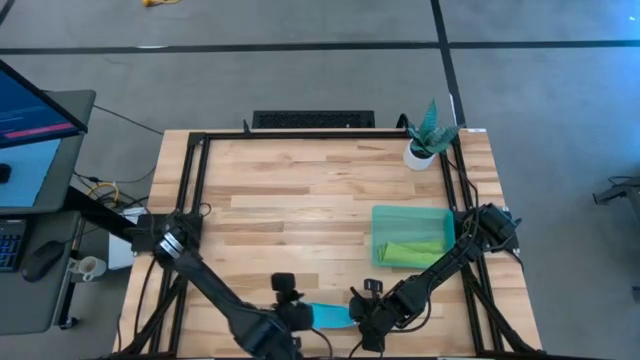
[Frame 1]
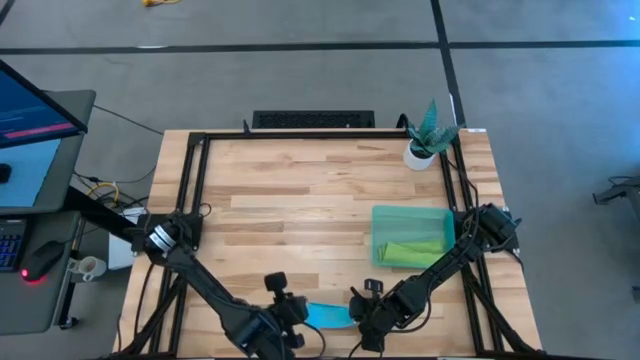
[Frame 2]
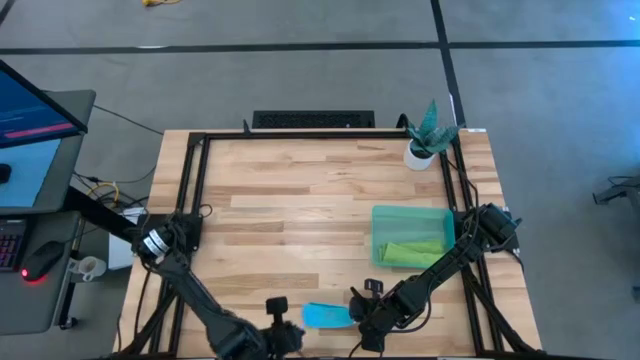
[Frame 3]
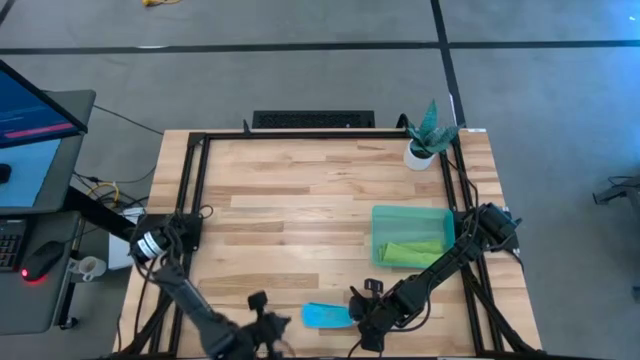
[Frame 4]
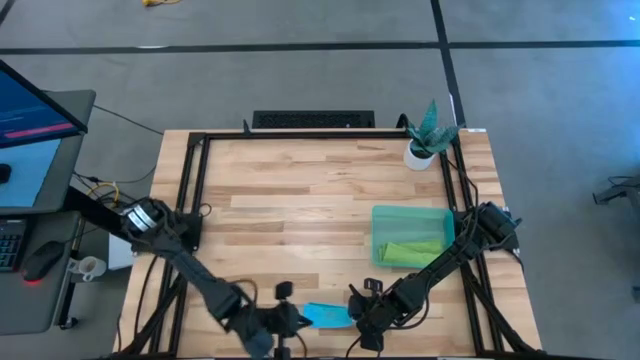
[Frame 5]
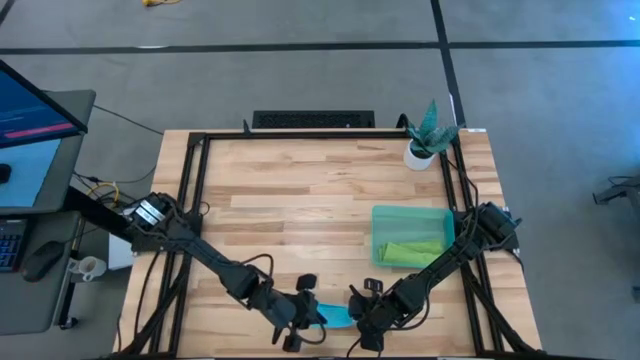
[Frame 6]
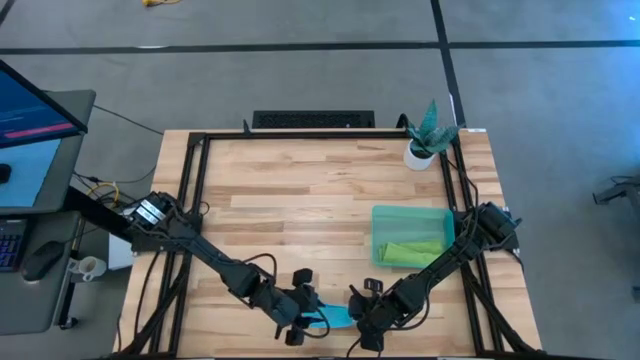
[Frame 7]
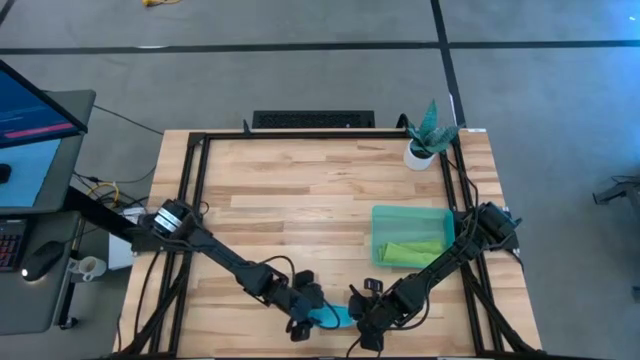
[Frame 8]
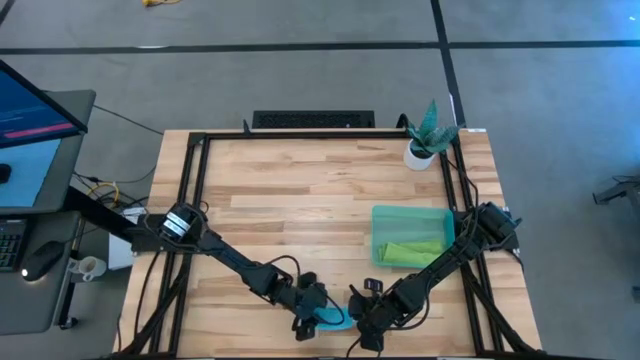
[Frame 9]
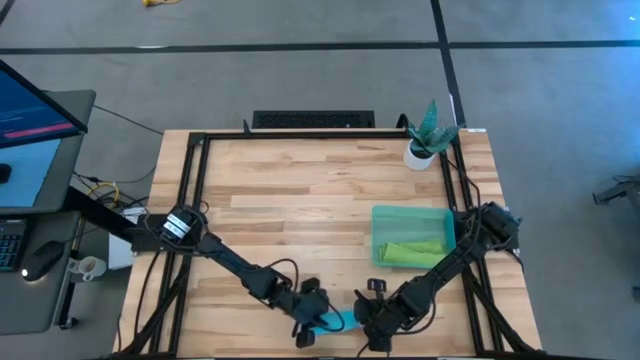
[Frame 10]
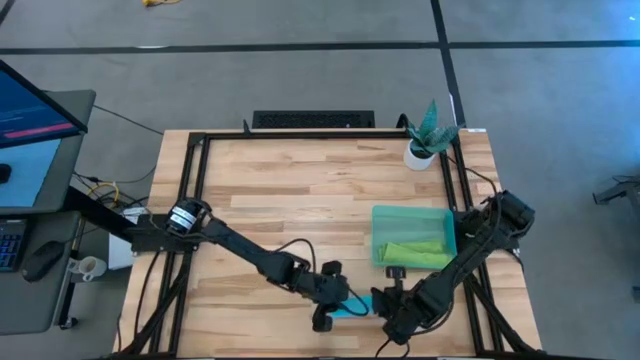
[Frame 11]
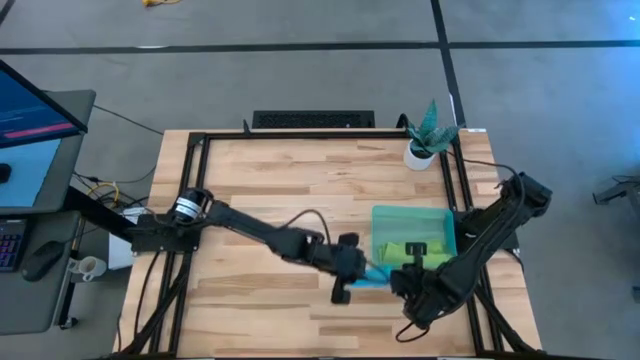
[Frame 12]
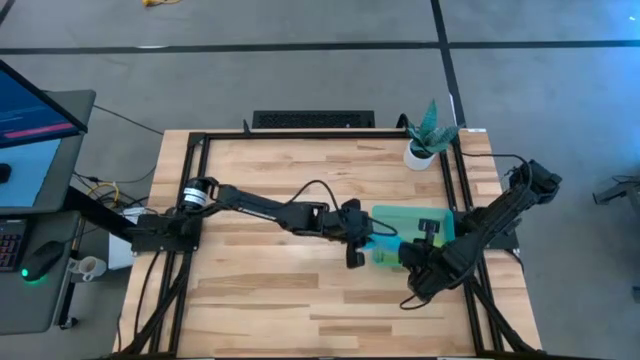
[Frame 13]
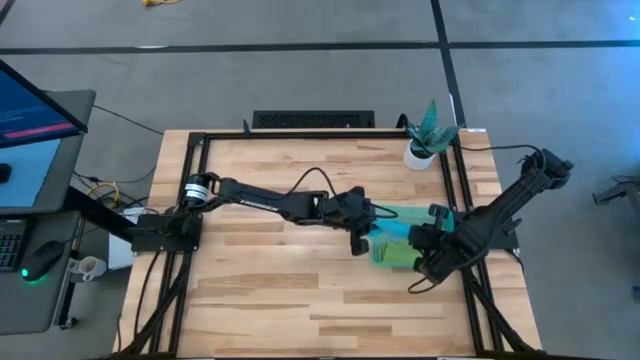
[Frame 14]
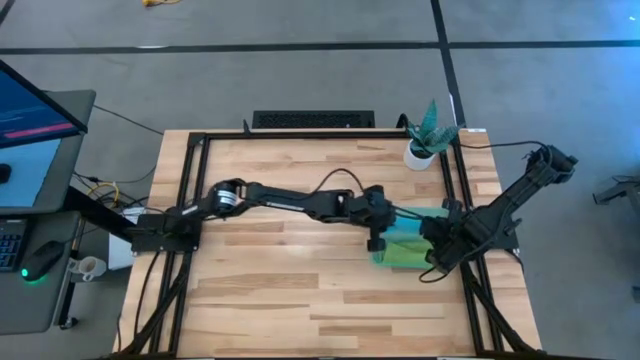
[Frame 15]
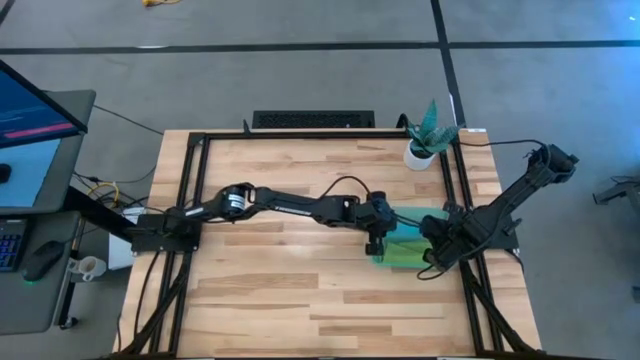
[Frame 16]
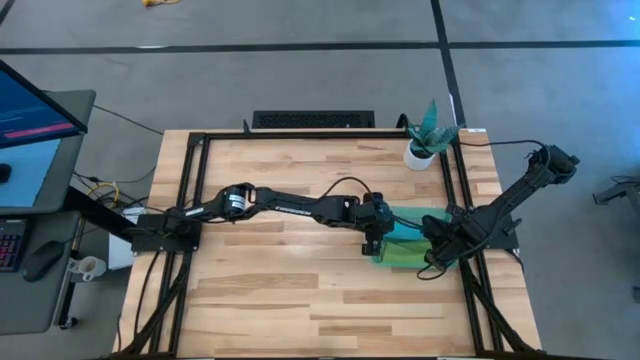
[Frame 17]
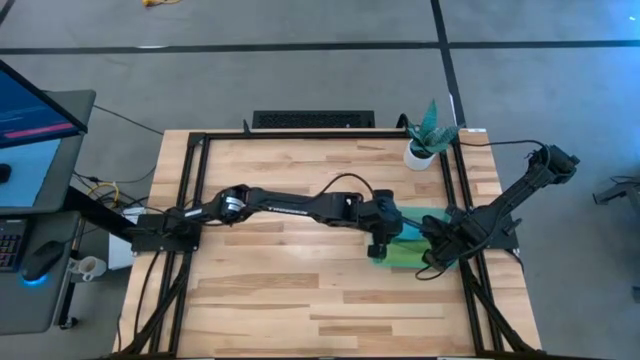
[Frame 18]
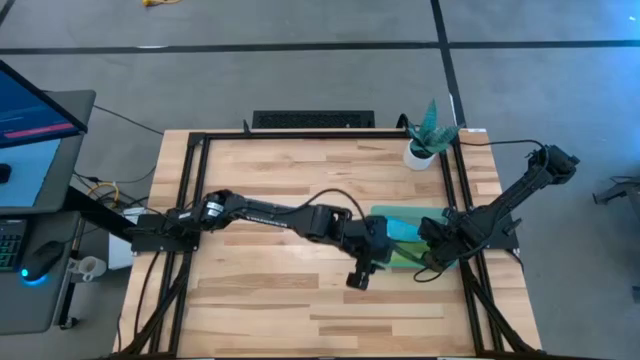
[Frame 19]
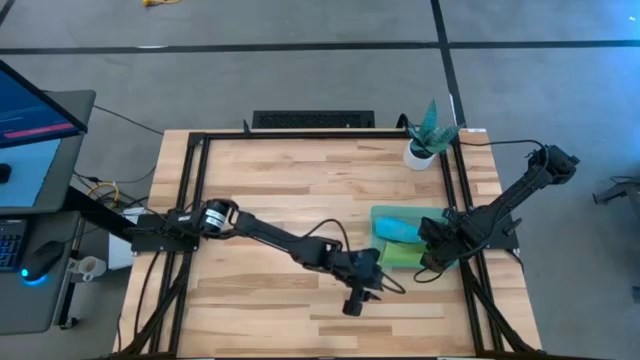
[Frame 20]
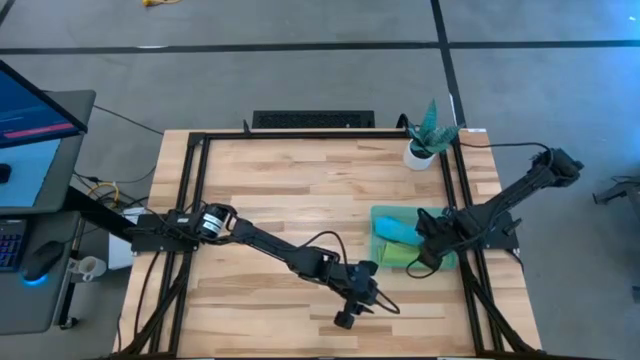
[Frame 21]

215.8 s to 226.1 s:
Task: Roll microfiber towels into tight, uniform cylinder then place into a basket
Put the blue towel into the green bin

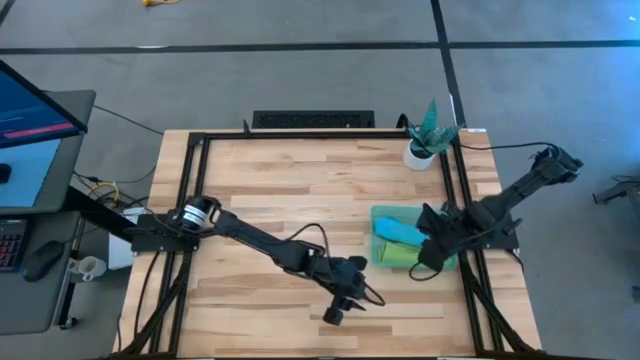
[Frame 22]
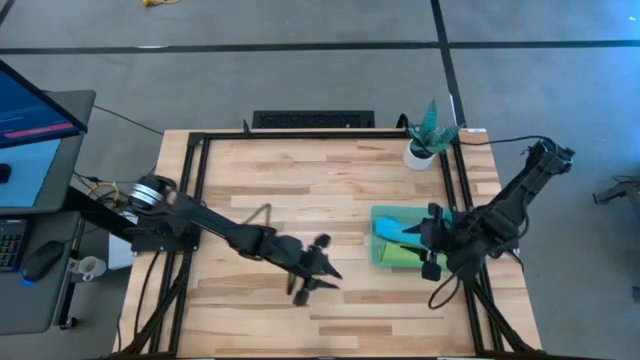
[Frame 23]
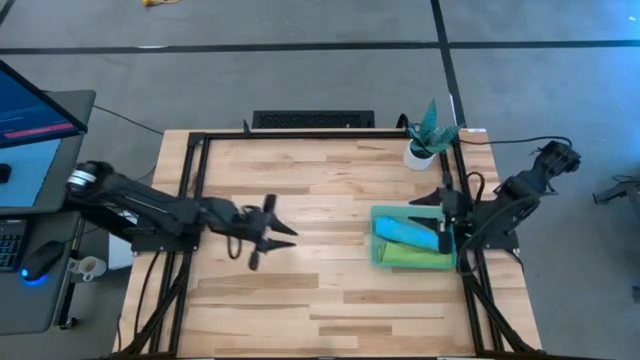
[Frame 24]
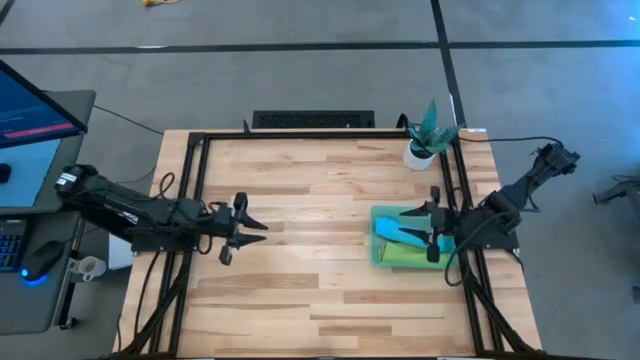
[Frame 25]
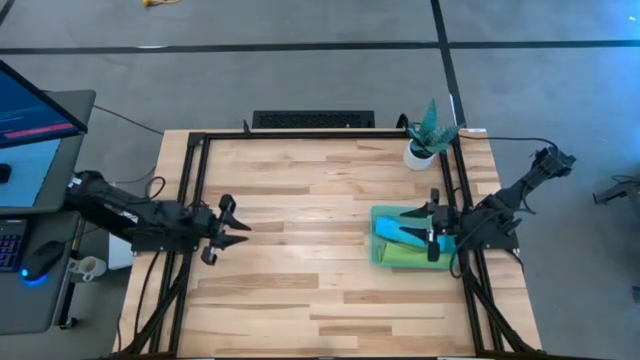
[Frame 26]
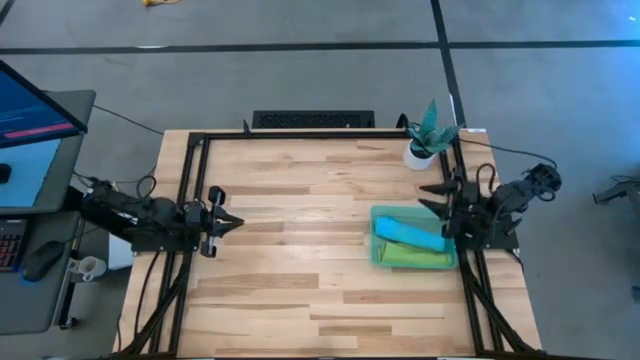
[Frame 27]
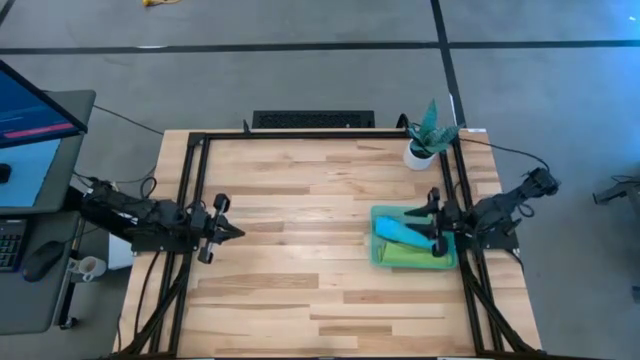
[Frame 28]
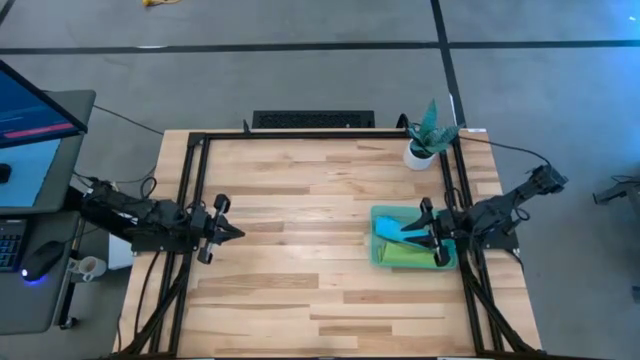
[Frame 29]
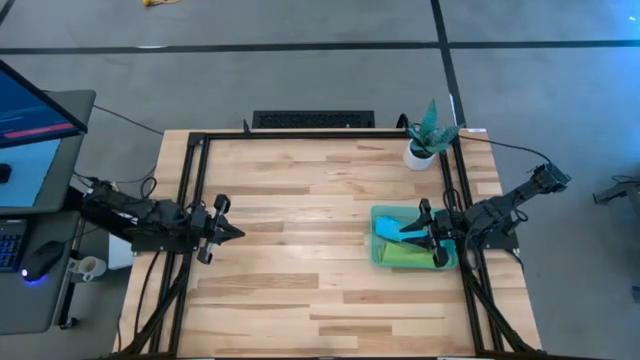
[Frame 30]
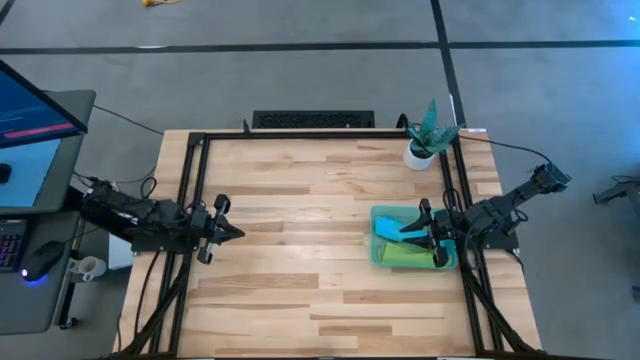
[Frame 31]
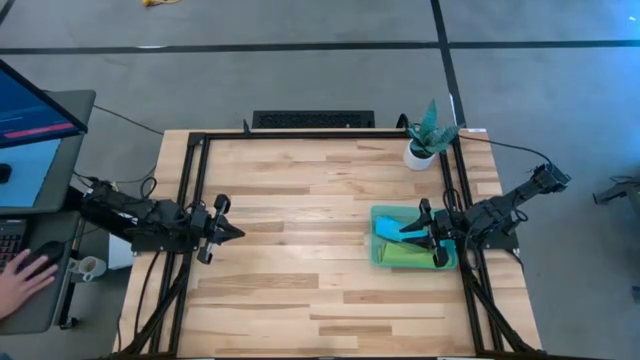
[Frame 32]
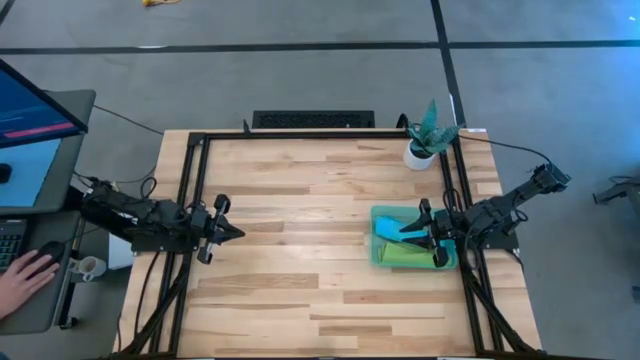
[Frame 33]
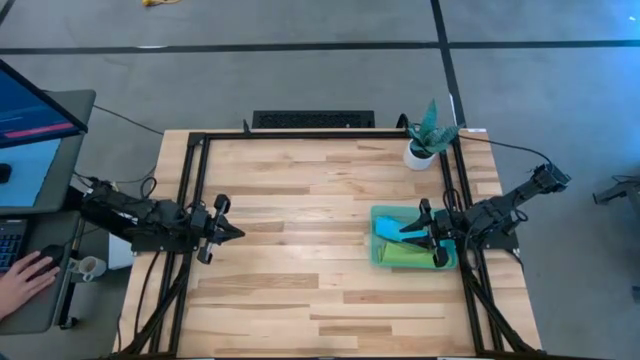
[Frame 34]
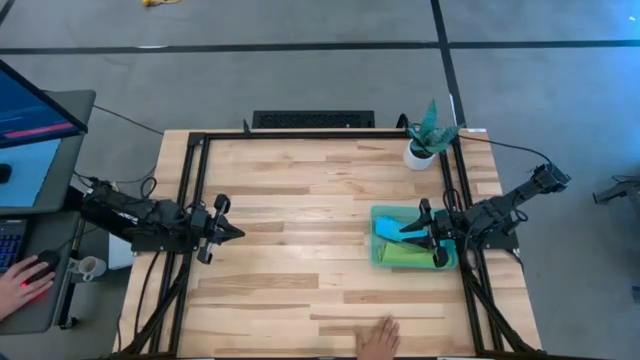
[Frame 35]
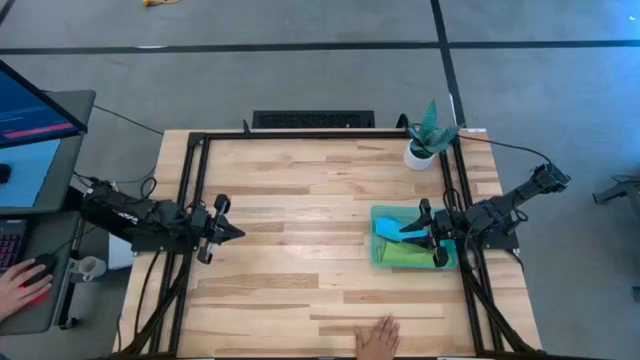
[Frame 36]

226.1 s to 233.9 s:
Return to Home Position

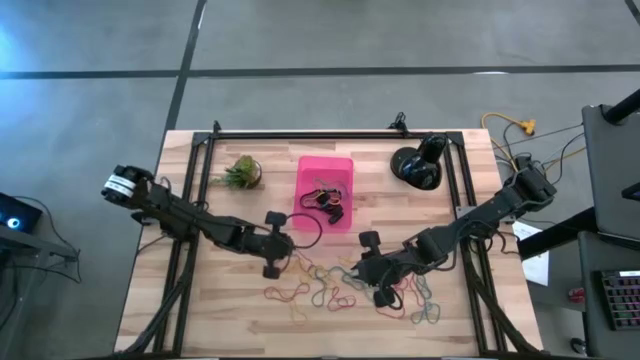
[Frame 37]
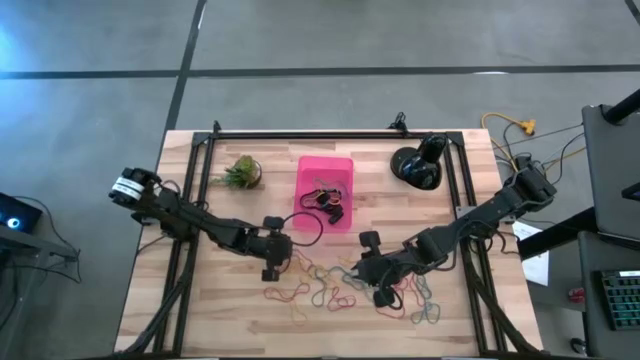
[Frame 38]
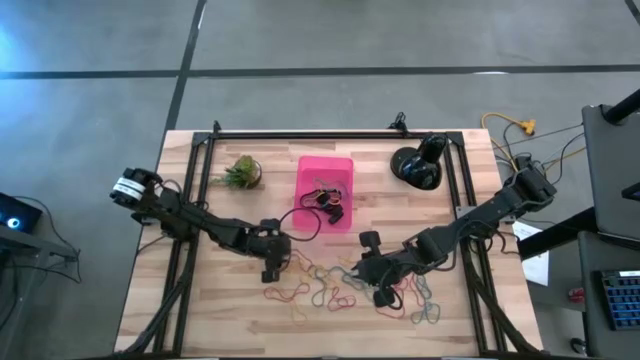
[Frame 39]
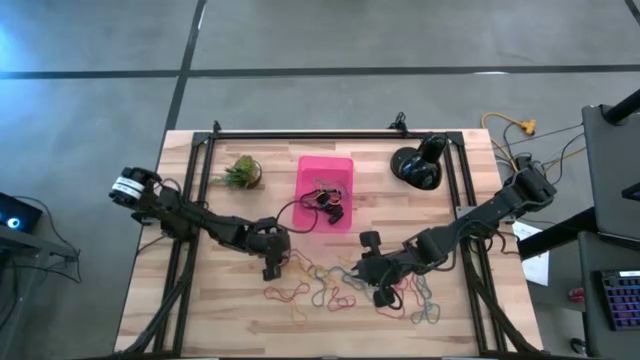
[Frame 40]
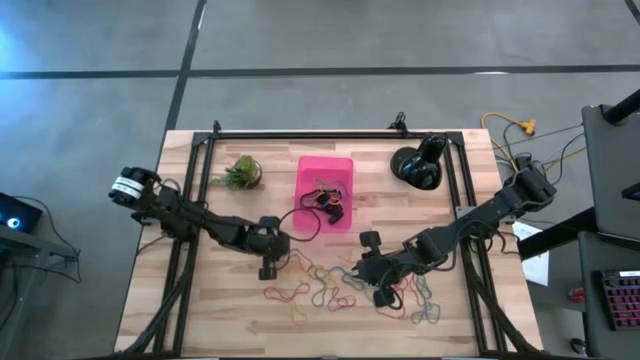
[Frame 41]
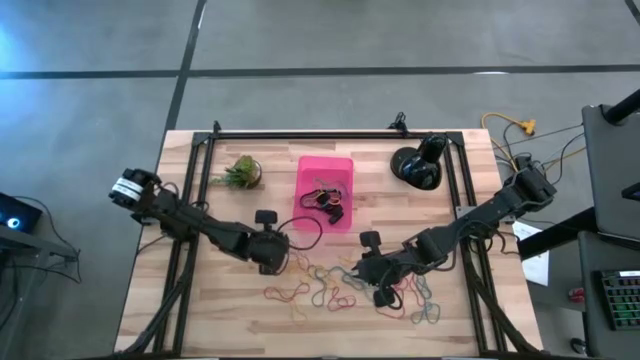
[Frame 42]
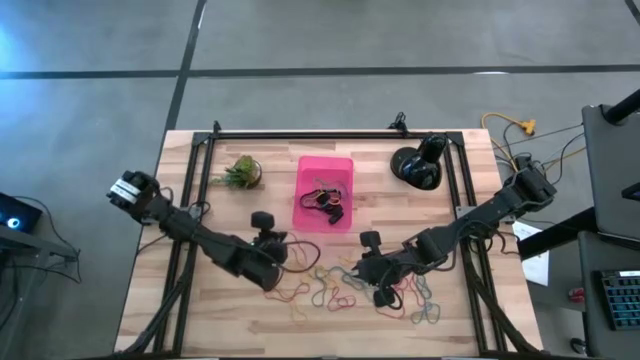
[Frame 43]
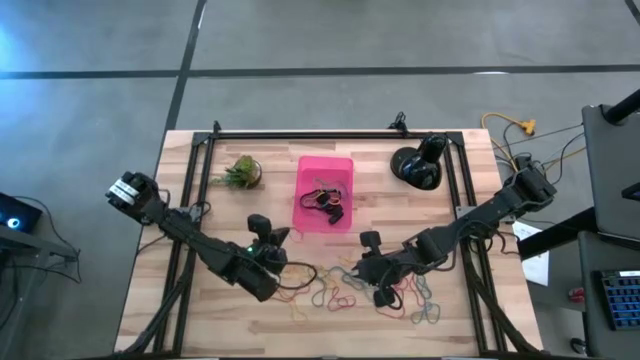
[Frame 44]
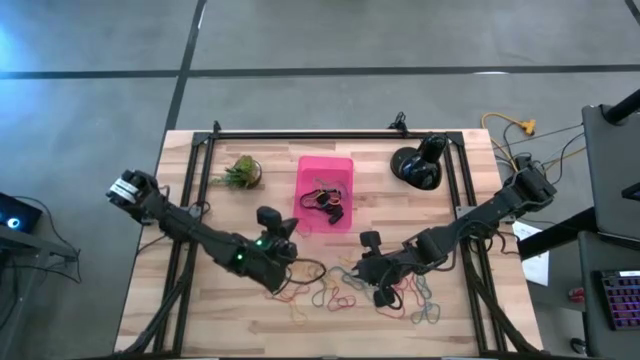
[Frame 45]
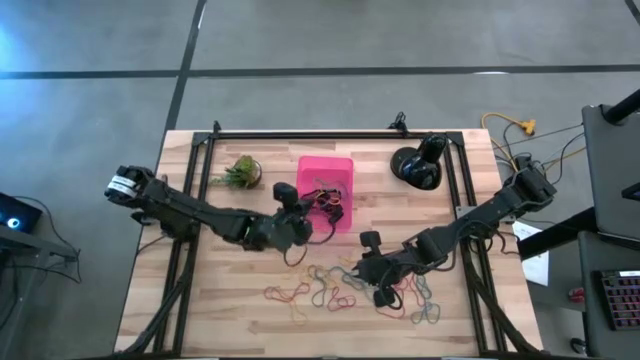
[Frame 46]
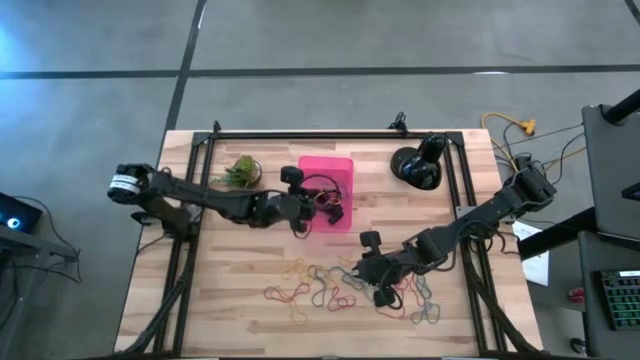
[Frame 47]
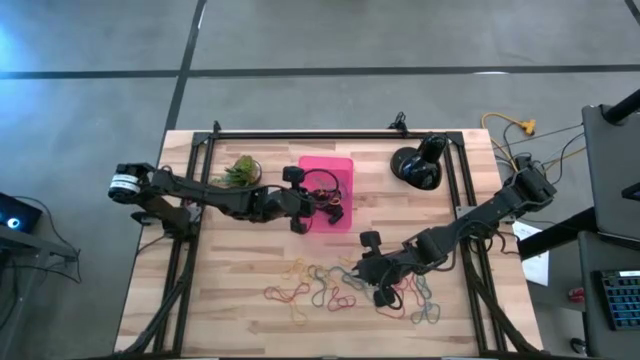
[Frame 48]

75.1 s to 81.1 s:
Task: Pick and place rubber bands into bin
Put the red rubber bands into the pink bin
